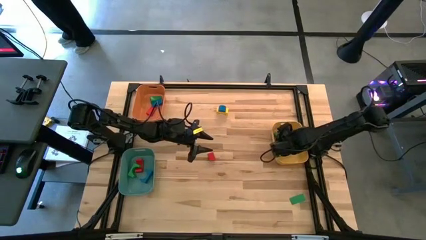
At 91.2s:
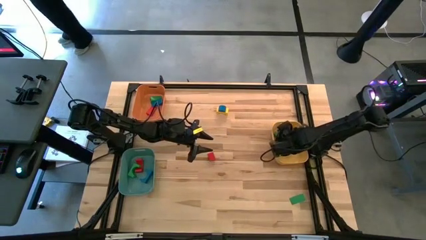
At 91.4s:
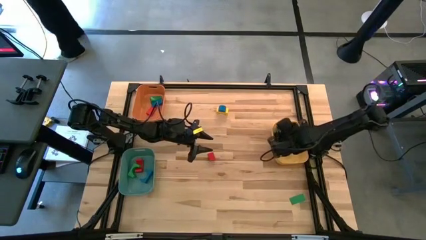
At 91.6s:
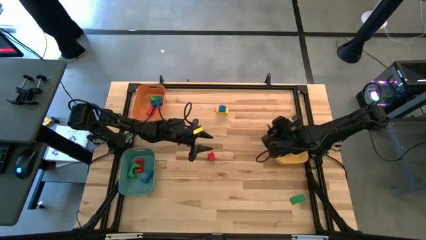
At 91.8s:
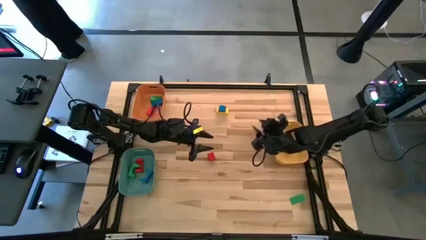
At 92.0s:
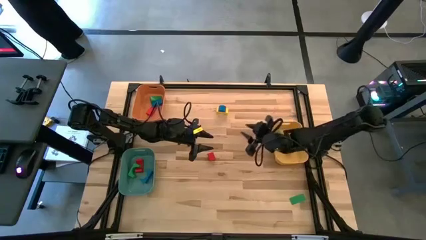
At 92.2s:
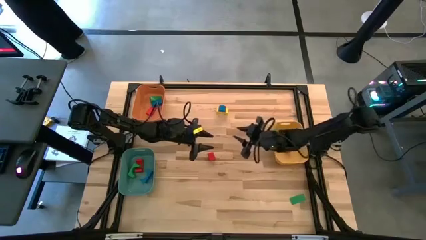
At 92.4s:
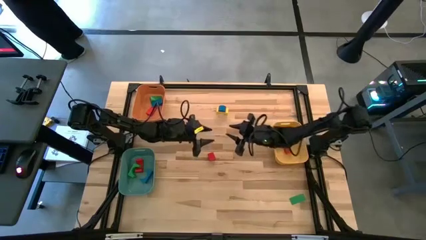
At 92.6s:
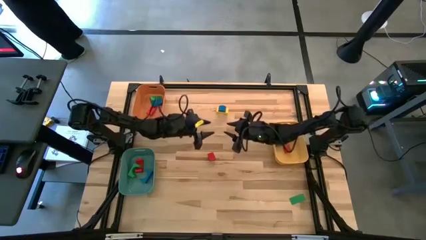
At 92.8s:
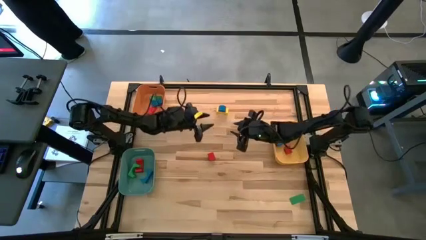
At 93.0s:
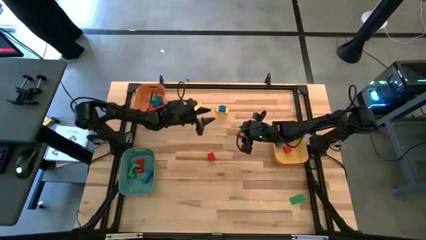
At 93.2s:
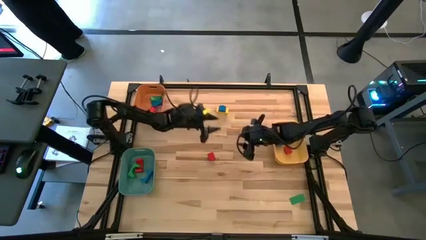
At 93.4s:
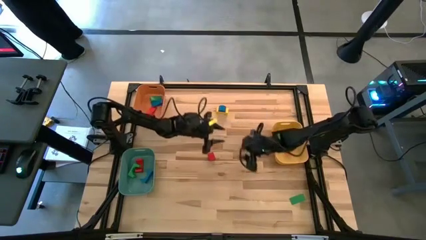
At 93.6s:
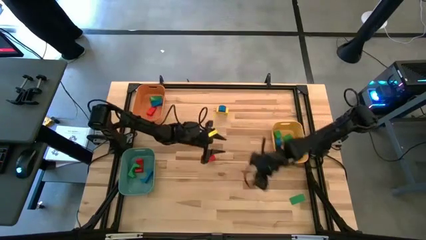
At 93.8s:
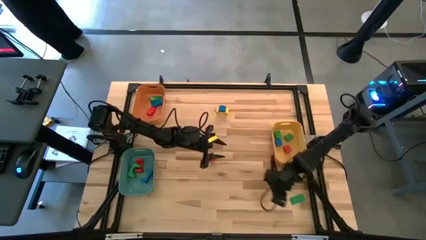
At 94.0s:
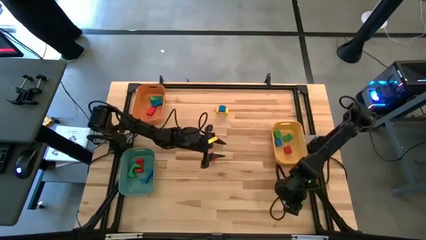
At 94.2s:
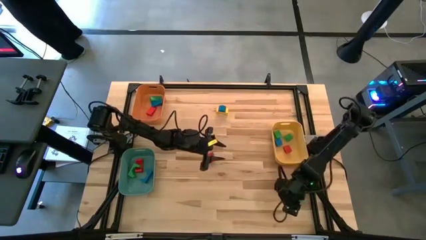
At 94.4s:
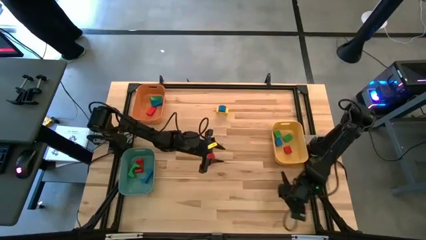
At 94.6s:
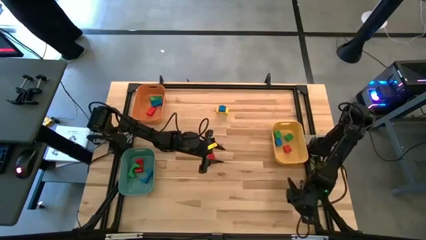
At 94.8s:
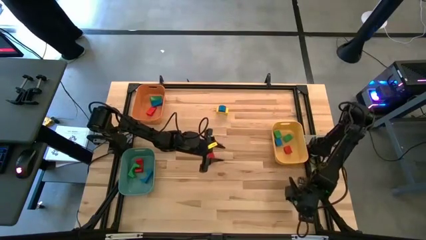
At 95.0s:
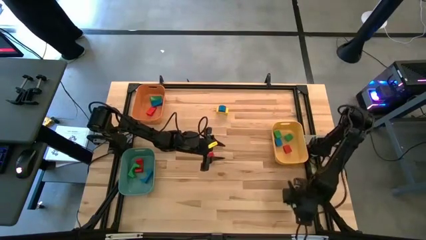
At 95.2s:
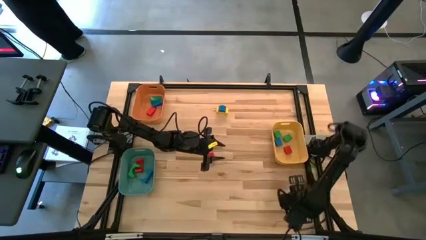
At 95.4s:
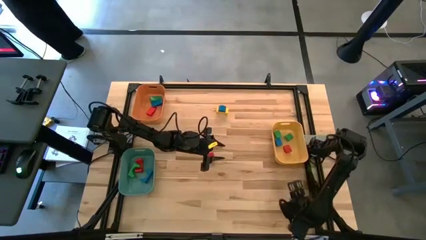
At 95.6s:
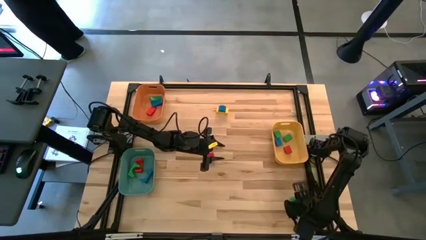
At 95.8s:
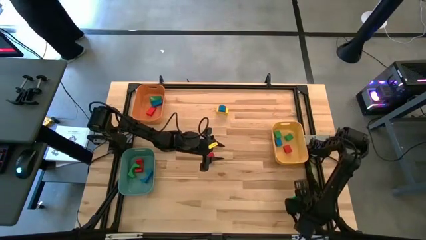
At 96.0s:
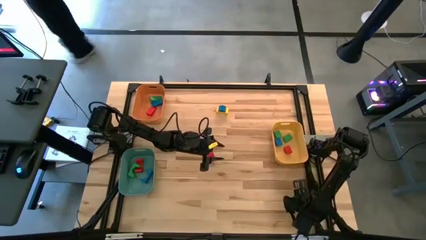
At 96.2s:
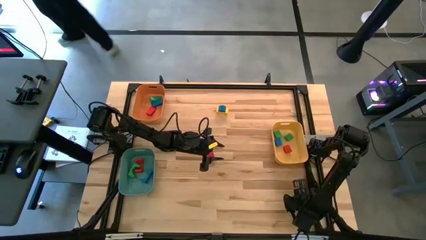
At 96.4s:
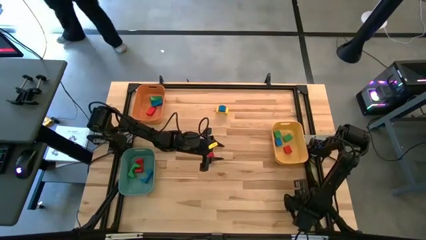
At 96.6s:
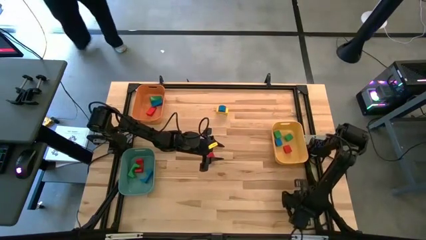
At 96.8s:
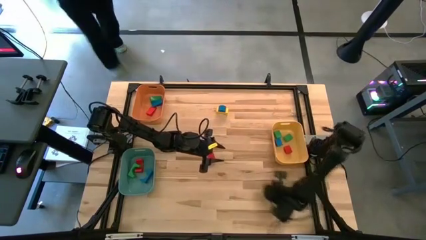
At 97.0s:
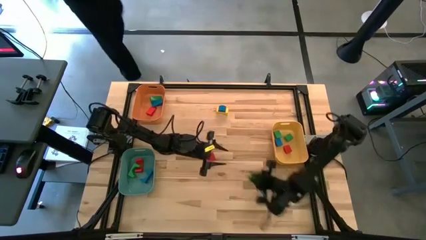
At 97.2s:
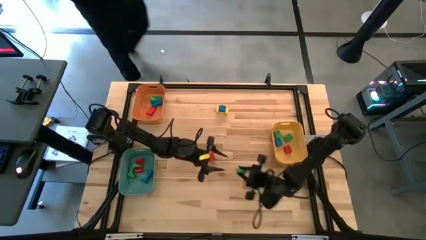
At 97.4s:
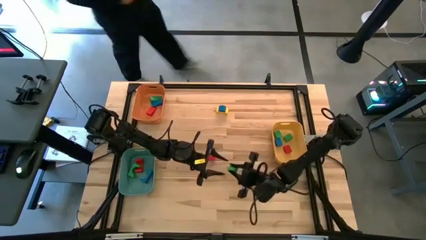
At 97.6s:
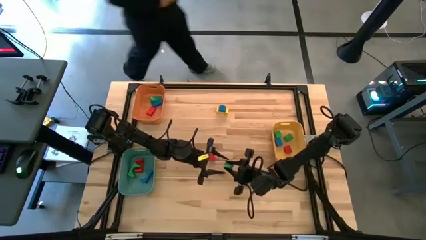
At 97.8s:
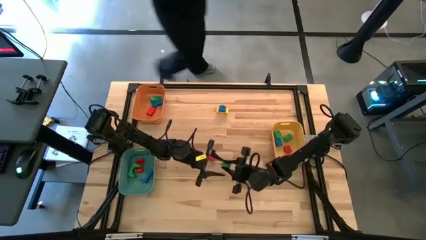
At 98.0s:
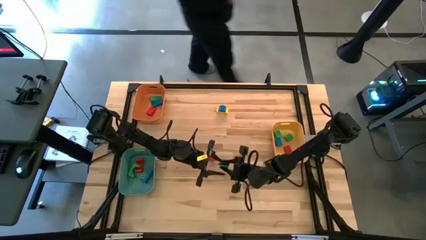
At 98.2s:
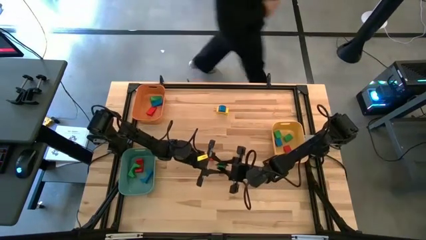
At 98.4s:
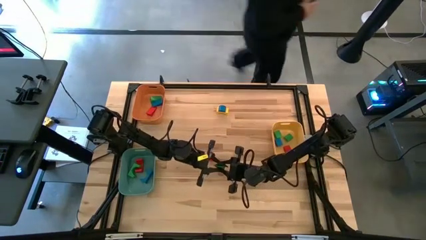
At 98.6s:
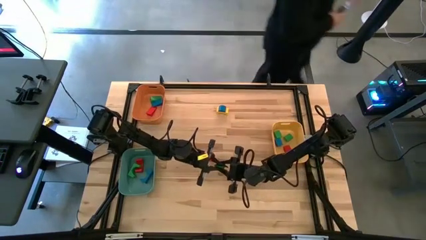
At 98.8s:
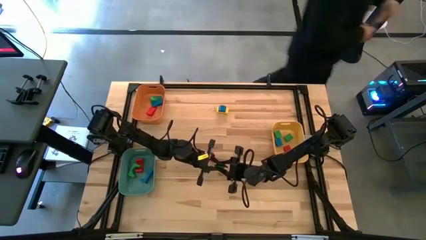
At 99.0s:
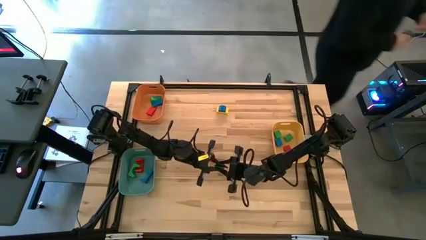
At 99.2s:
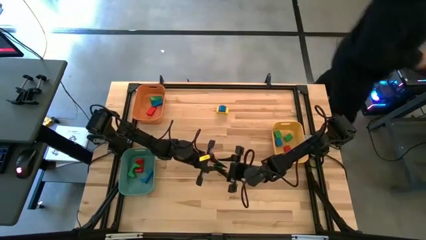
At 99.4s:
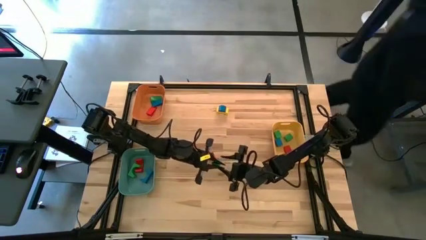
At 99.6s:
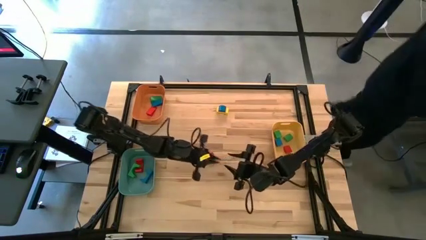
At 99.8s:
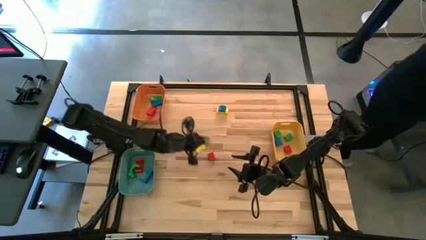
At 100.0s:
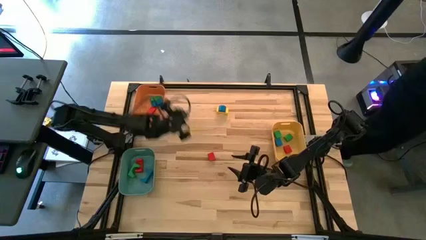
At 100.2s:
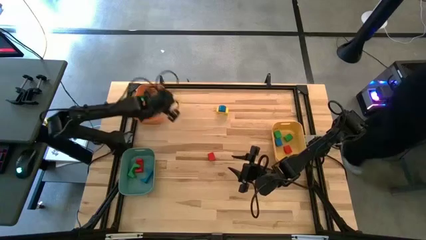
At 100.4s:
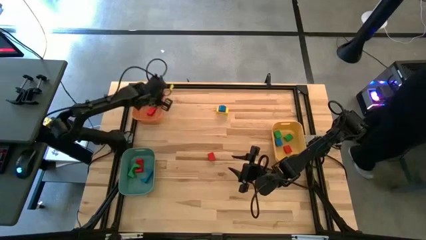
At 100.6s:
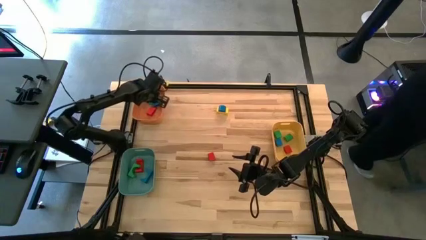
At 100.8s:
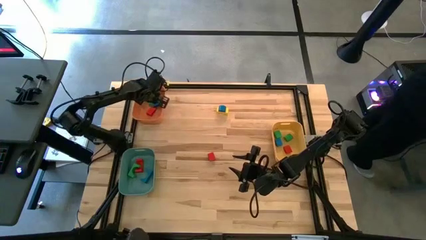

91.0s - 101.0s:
Task: Sort blocks by size
Put the green triangle block into the orange bin

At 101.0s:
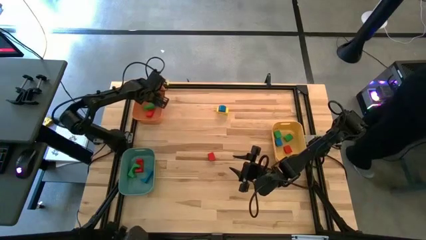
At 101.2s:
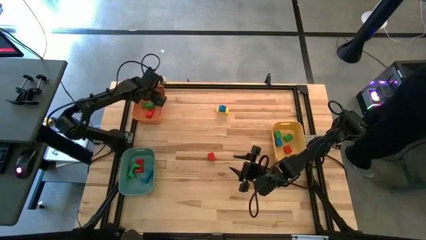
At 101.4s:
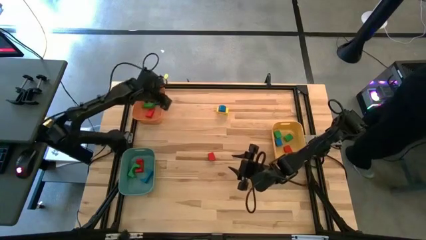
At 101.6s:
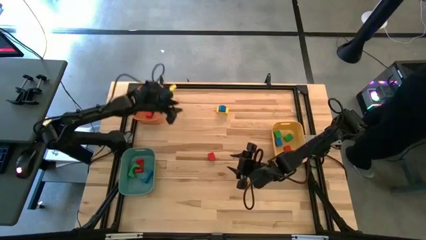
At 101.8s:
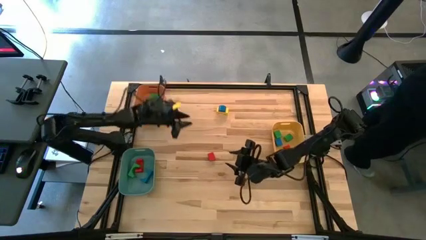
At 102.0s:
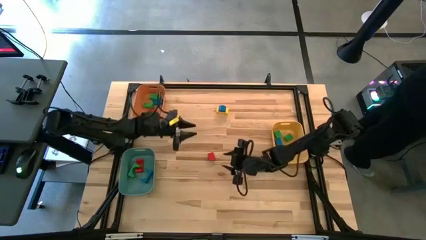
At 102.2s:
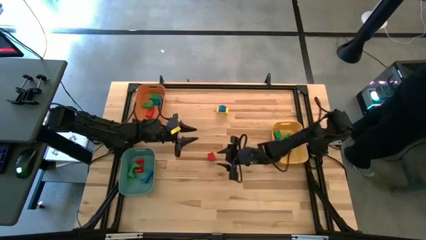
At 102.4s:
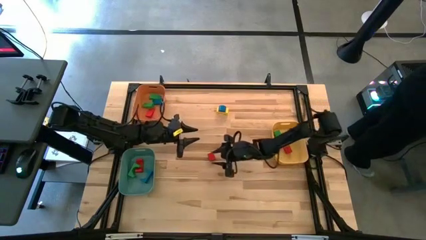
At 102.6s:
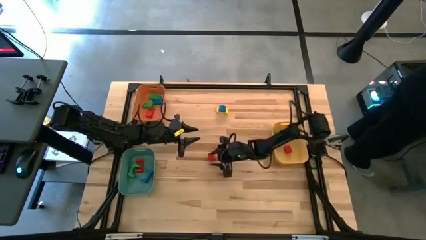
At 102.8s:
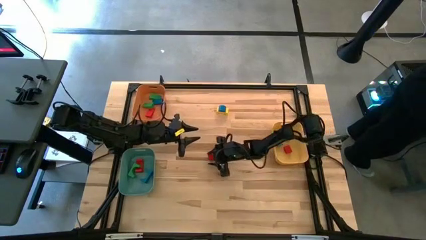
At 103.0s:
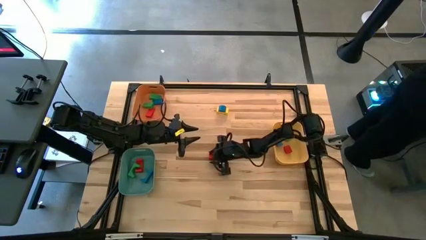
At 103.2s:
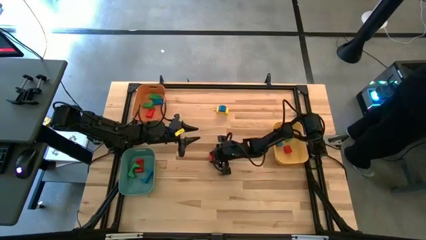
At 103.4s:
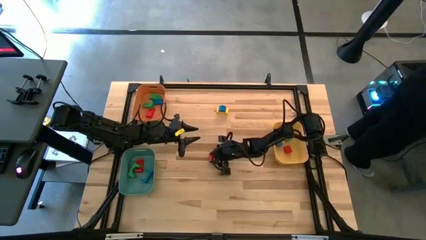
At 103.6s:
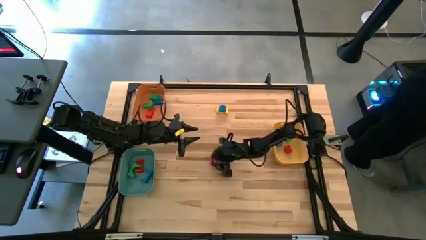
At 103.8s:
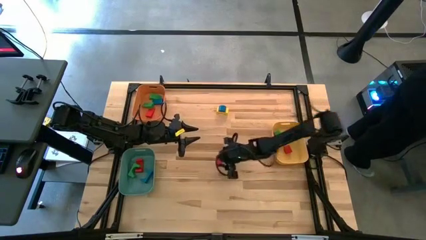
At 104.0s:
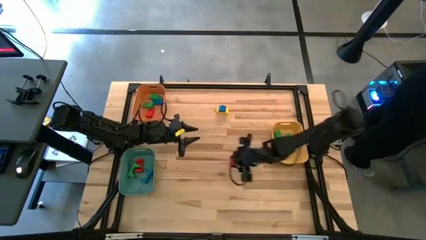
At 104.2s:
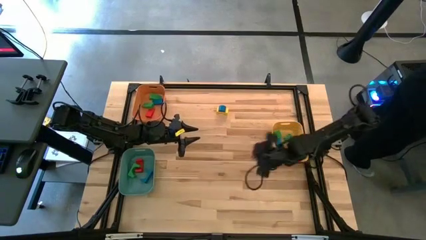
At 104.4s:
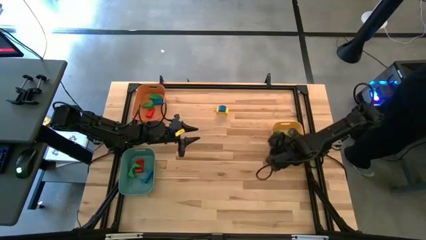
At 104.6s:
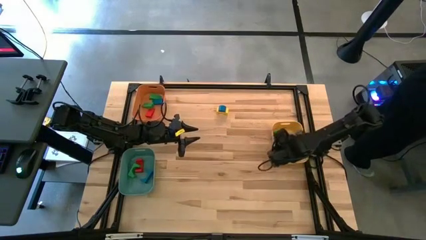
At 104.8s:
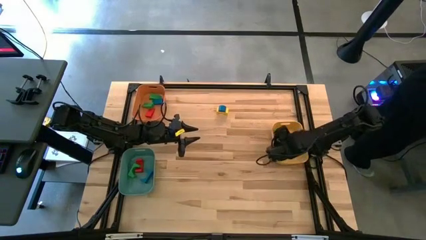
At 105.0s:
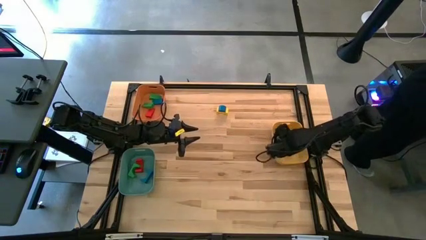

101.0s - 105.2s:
Put the red half-circle block into the yellow bin

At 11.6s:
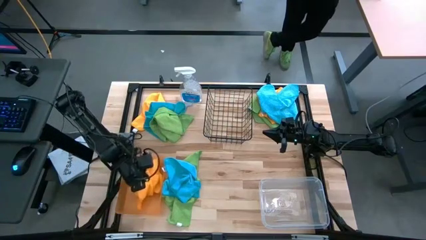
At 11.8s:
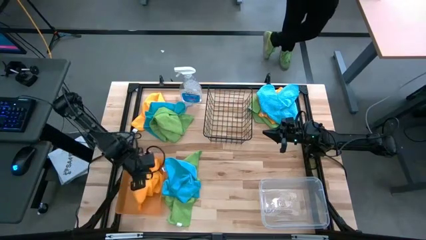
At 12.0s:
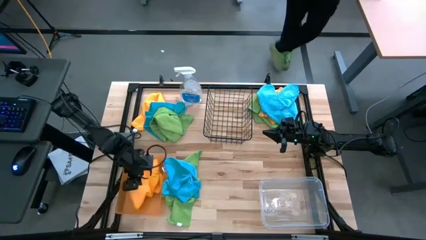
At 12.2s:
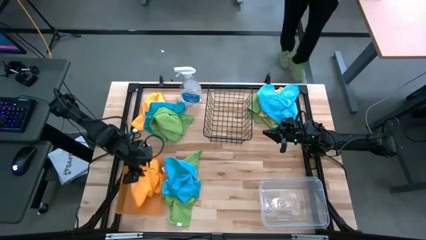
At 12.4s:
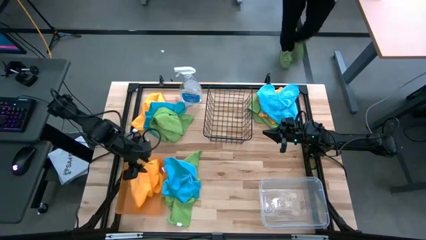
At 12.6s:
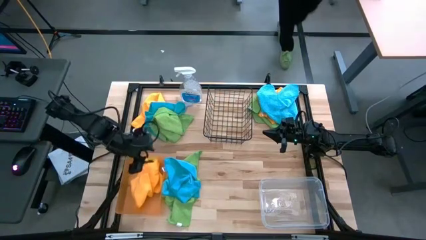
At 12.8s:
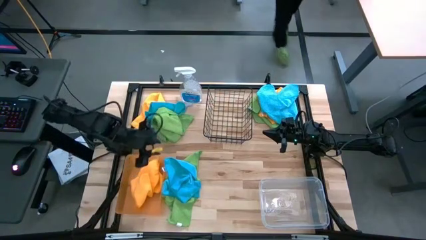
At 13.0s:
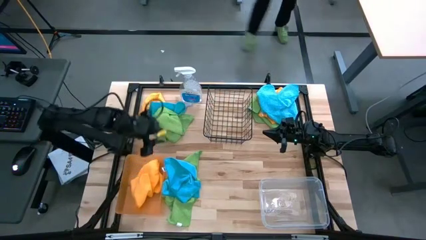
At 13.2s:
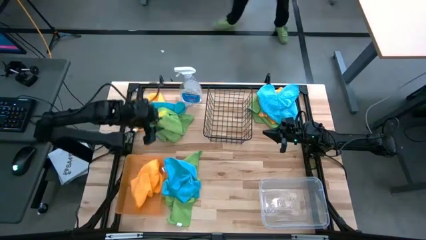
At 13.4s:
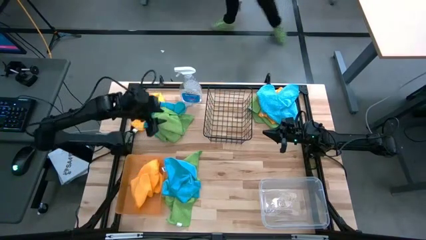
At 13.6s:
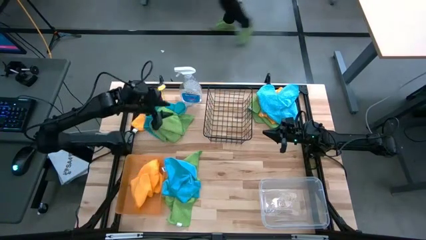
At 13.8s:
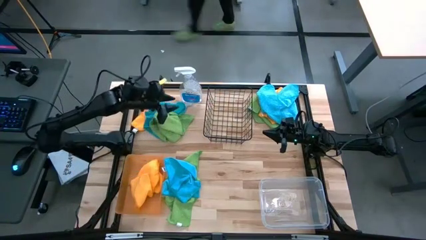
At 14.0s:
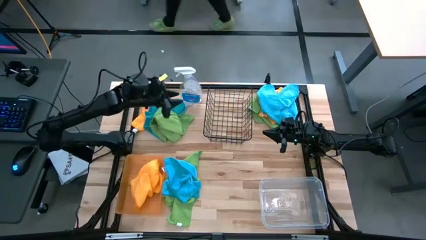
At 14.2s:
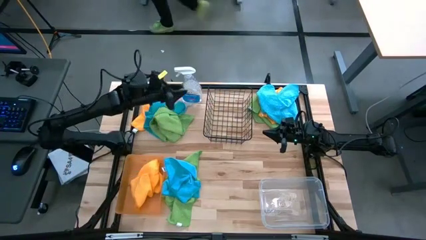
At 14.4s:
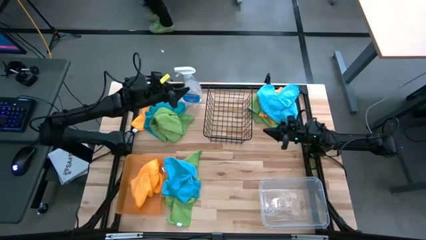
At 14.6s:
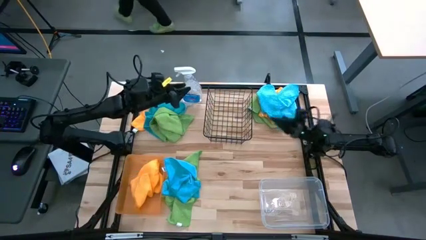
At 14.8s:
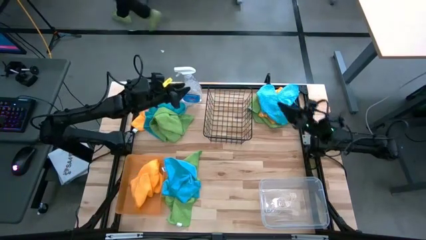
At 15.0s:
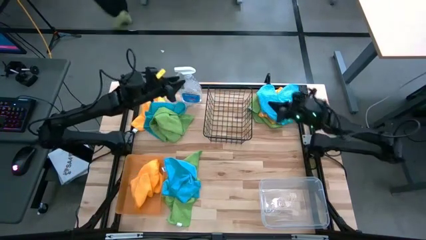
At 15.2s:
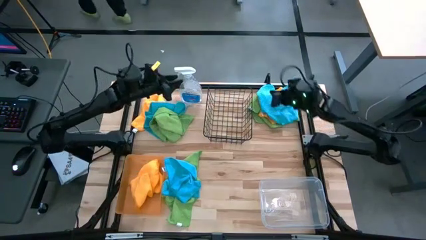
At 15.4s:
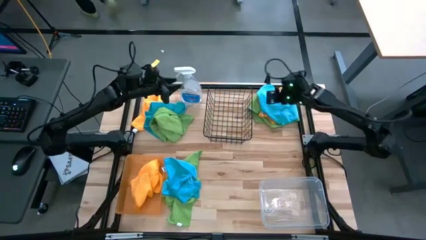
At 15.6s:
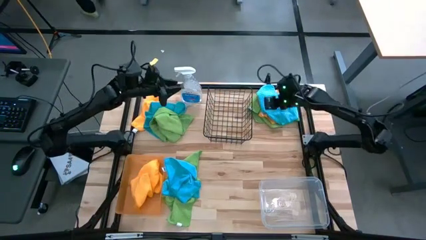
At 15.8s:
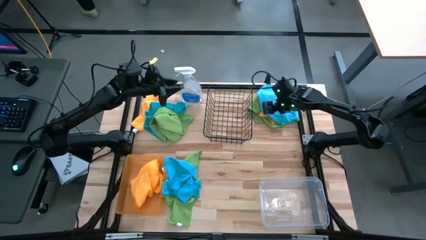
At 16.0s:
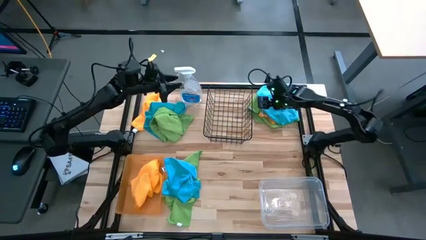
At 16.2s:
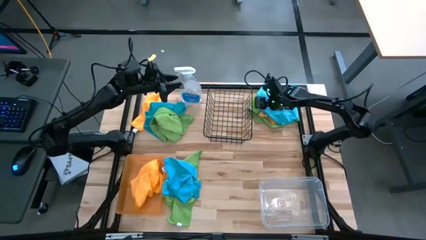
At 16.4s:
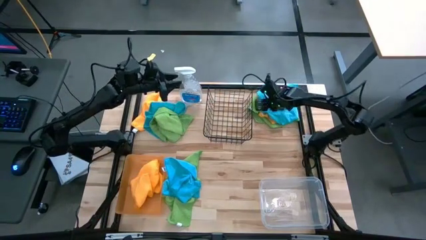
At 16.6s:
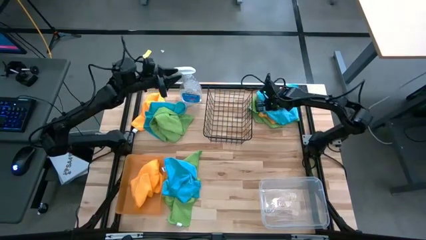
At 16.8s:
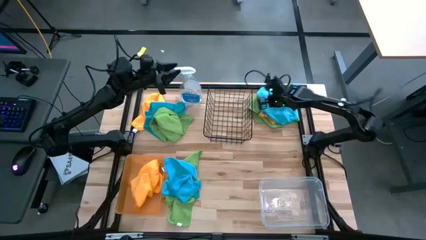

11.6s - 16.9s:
Task: Sort microfiber towel by color & place in baskets
Put the top right blue towel into the wire basket
